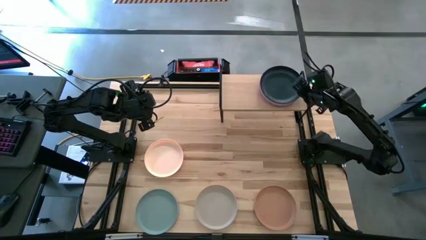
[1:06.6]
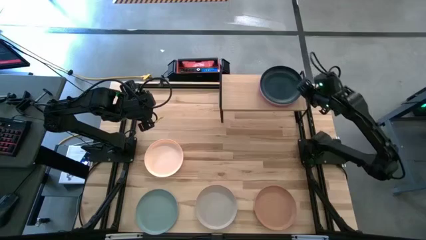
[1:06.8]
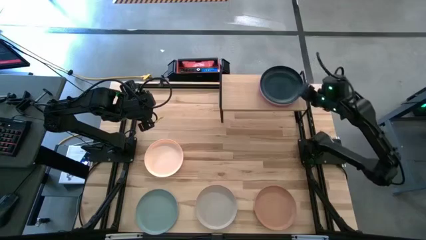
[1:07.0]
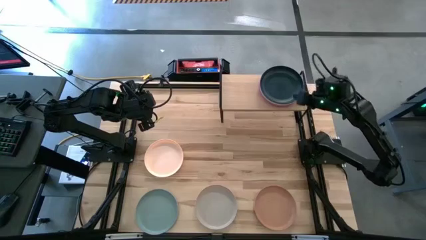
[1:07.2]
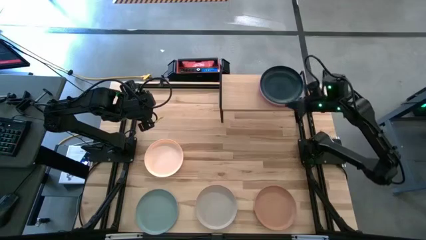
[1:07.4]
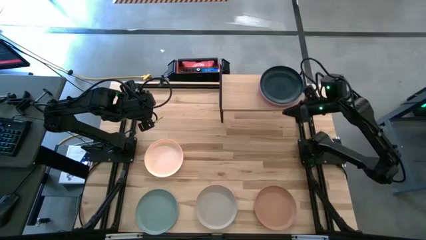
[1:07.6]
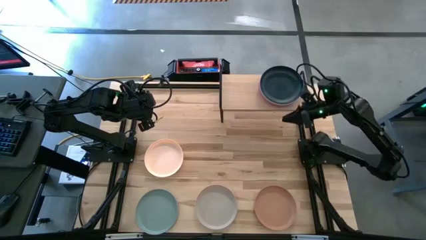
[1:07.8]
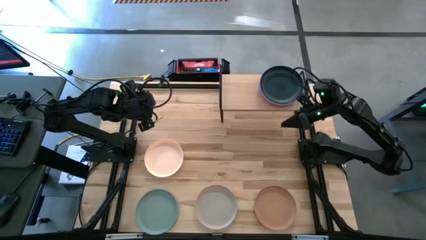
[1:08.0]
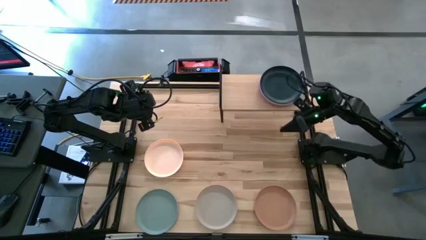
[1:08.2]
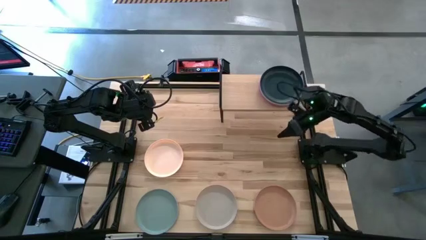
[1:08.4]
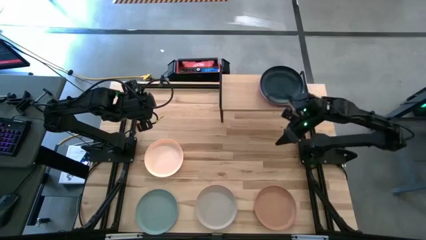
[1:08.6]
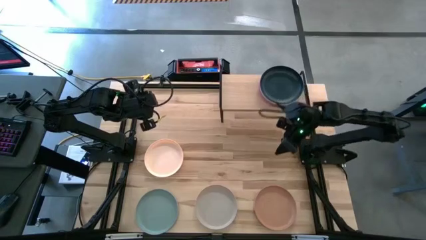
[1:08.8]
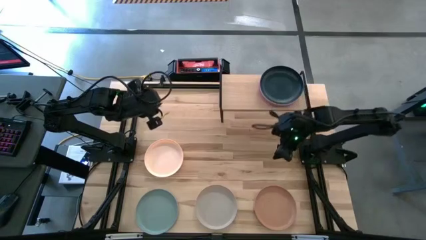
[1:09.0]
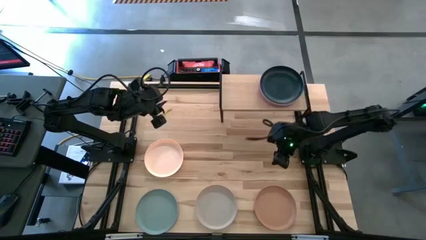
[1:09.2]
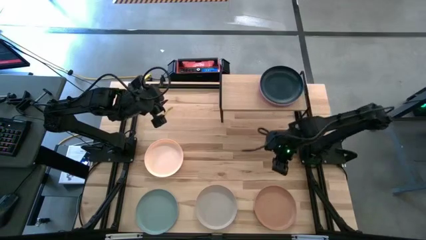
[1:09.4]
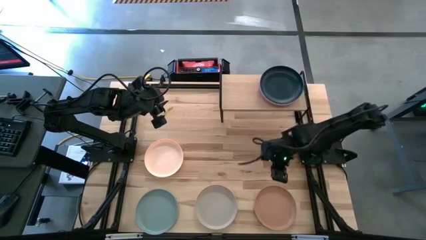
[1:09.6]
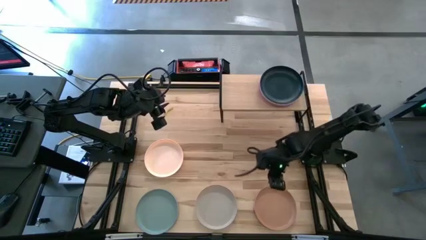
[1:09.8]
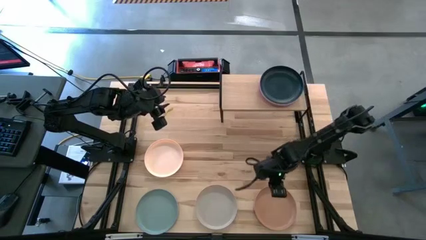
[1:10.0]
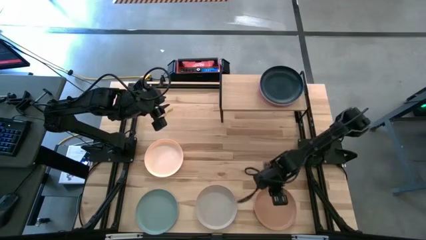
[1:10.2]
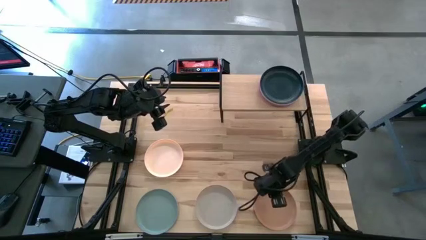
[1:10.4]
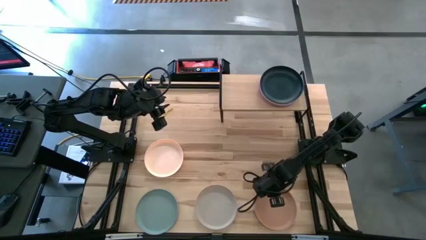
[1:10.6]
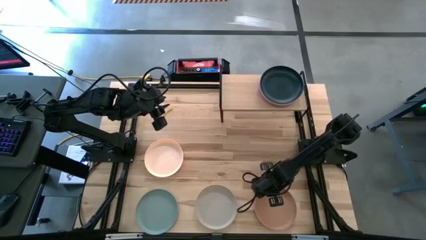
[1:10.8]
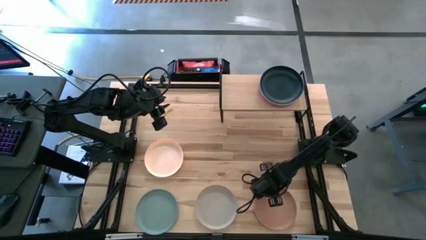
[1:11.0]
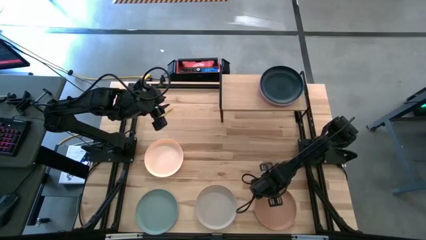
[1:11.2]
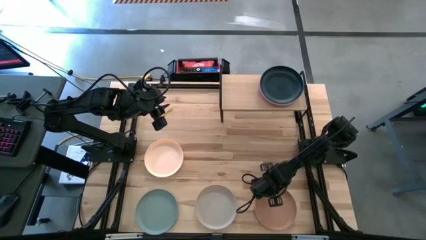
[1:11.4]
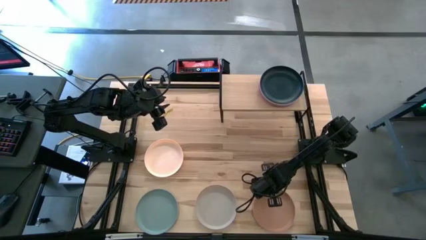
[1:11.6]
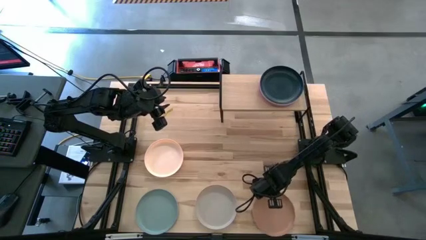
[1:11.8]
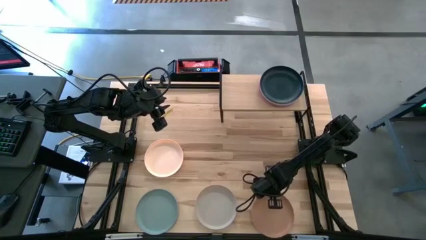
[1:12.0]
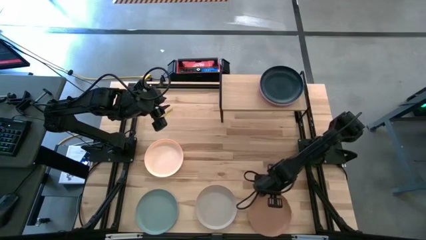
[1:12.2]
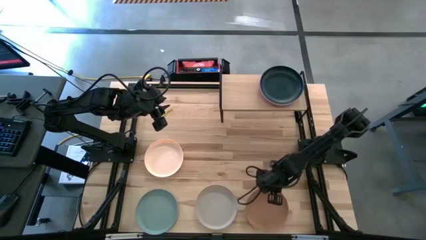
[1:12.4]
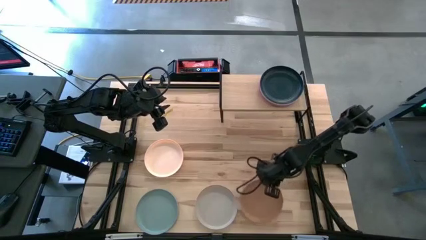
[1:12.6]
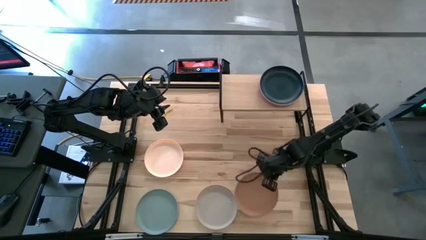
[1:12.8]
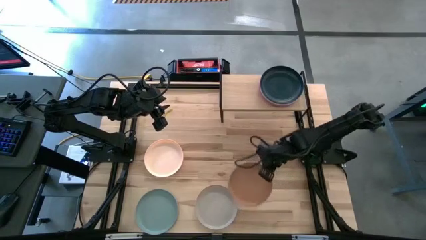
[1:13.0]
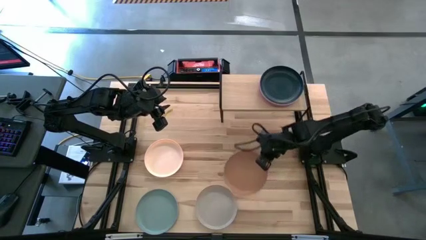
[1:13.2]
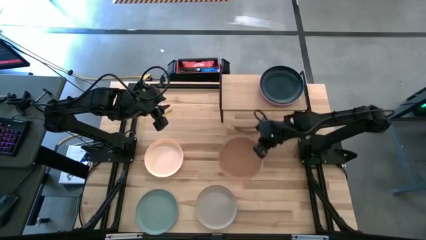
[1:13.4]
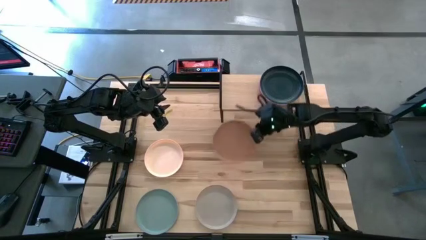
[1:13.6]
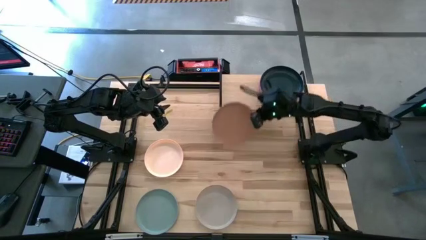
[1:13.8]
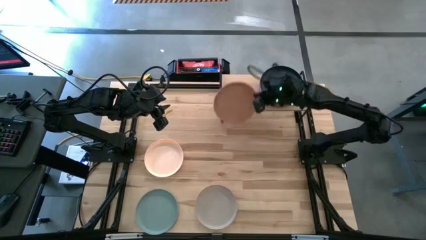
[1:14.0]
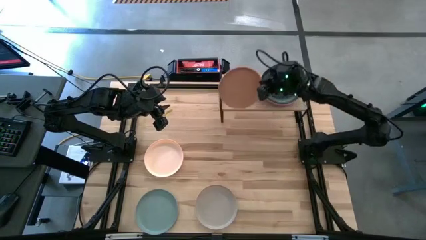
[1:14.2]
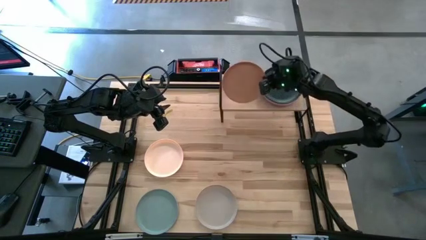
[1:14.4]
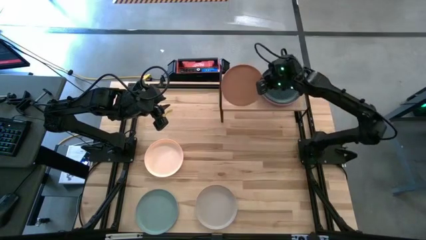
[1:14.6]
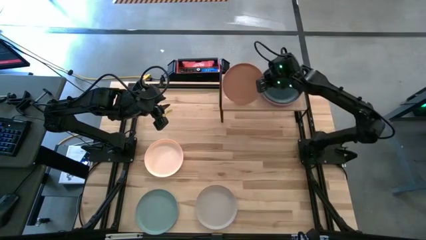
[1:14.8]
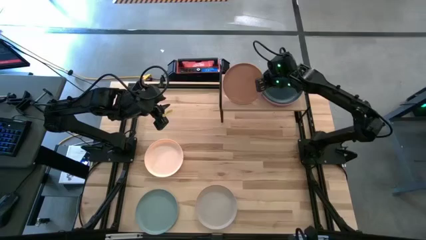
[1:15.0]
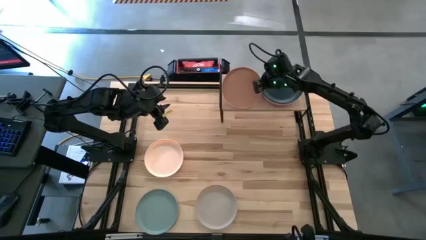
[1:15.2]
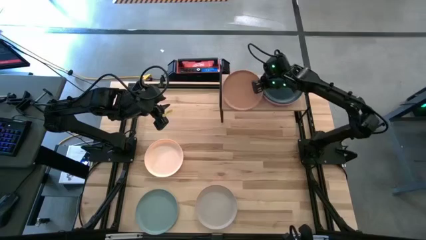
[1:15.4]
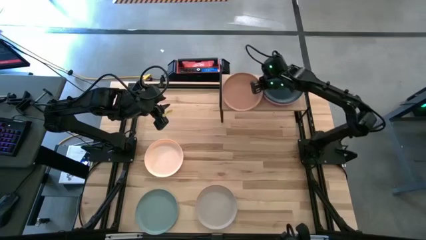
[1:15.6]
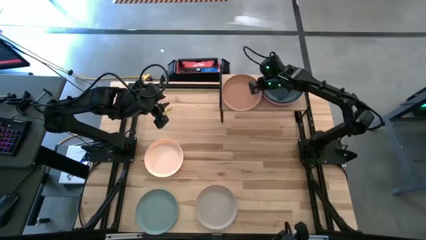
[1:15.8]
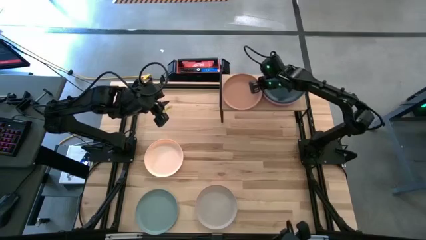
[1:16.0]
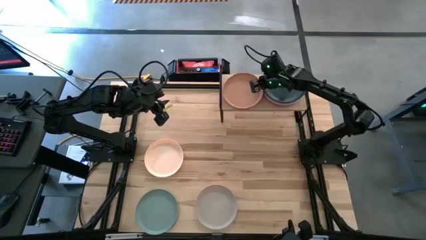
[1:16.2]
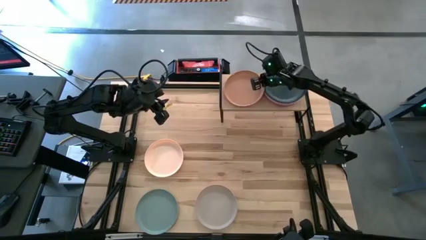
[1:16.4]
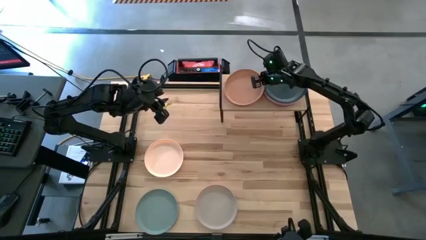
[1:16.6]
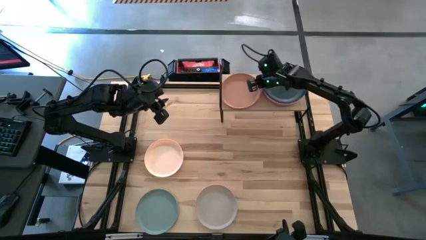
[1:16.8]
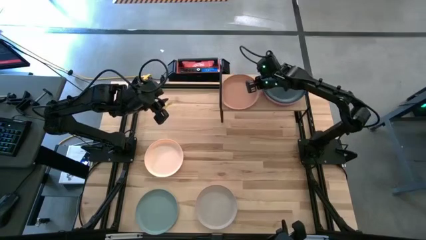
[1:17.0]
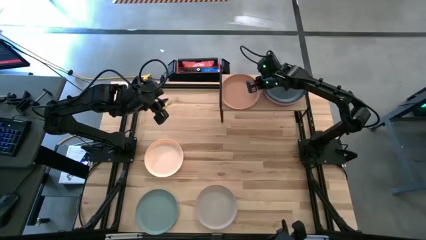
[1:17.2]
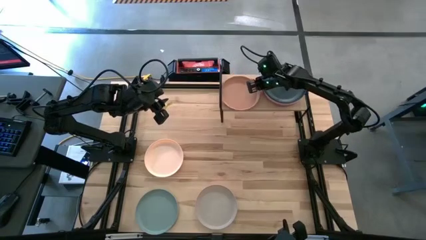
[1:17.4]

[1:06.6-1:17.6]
Task: Place and stack plates onto a shelf
Put the brown plate onto the shelf

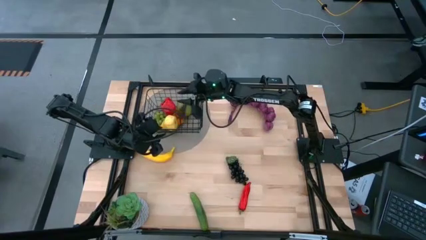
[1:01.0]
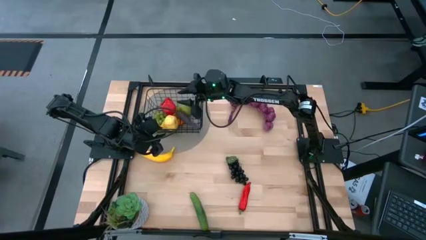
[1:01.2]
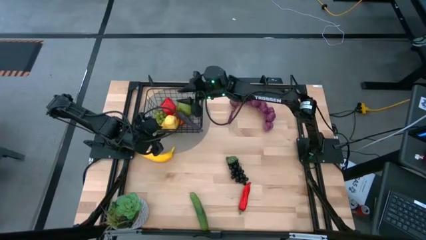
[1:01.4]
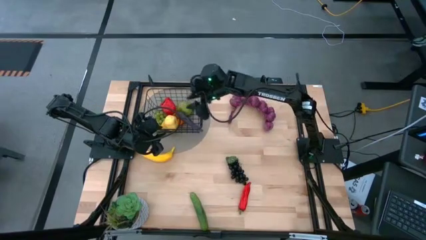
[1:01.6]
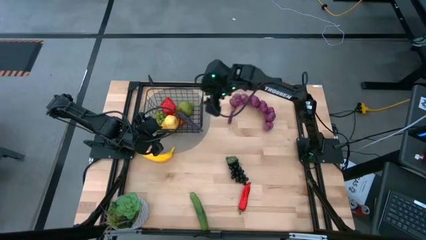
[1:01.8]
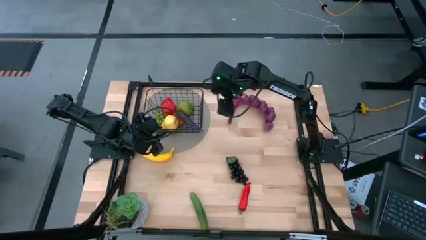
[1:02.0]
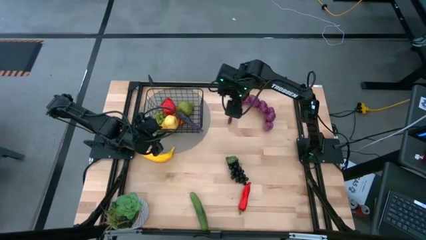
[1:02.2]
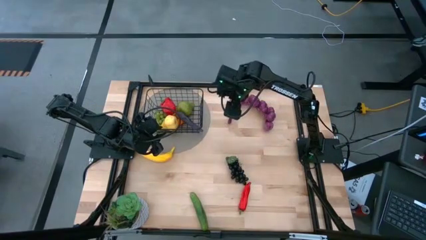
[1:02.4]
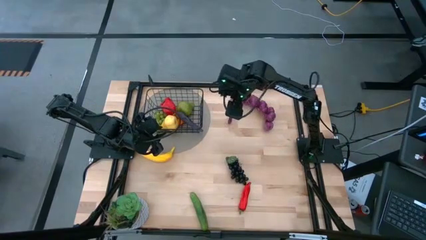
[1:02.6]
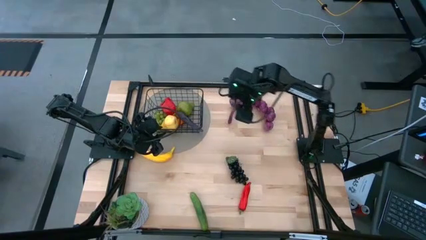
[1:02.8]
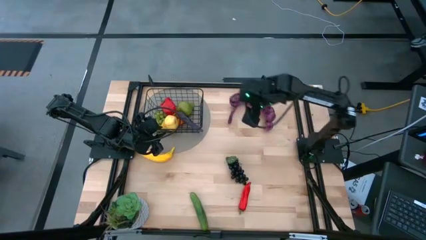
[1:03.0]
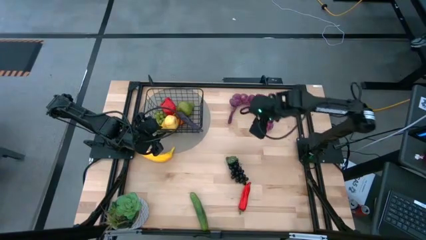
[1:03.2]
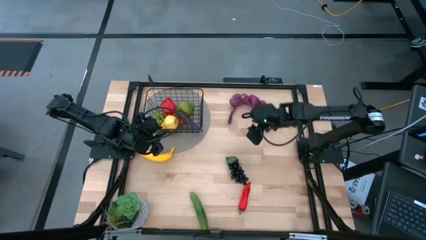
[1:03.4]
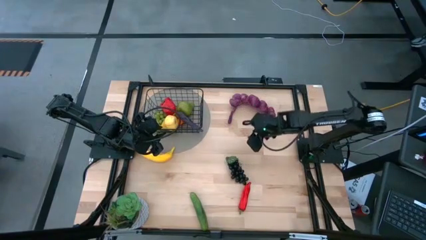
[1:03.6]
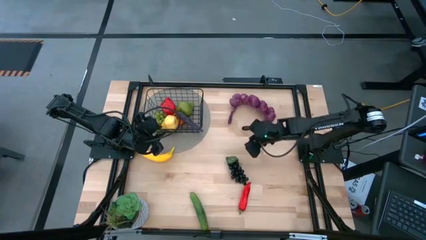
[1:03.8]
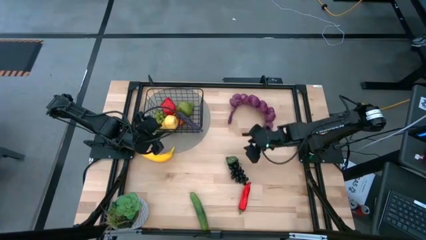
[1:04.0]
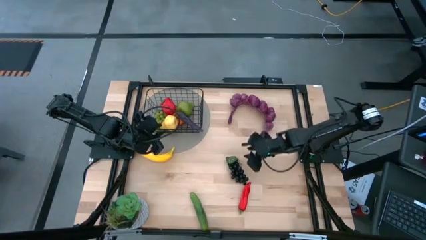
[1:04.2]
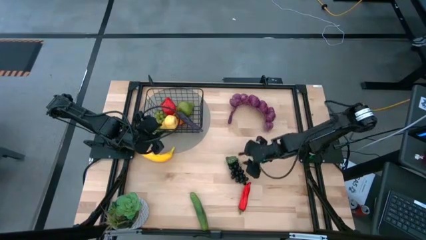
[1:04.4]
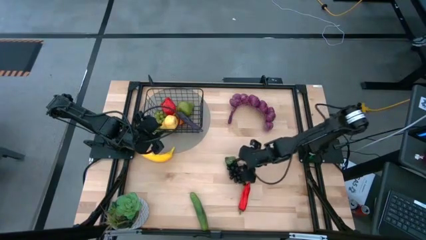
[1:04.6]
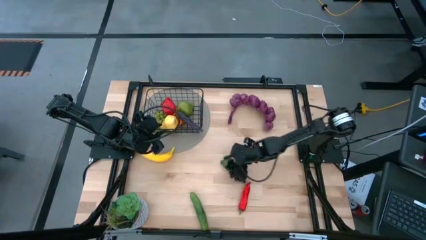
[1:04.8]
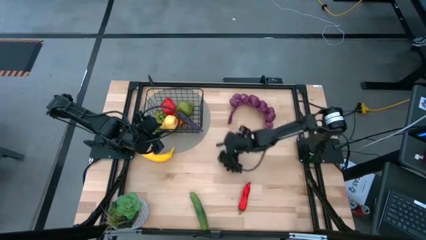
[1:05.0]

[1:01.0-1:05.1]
Task: Build produce basket
Adjust the black grapes on the table

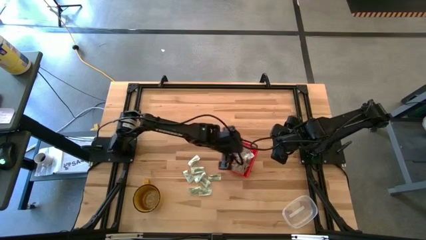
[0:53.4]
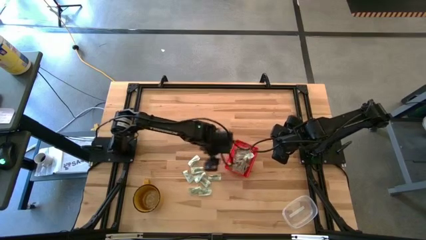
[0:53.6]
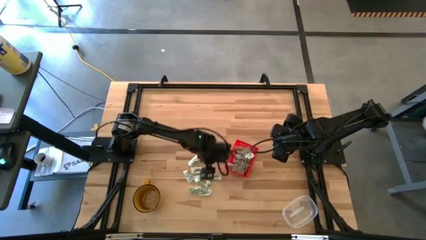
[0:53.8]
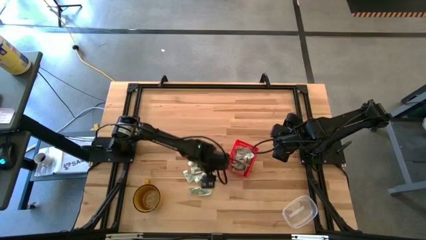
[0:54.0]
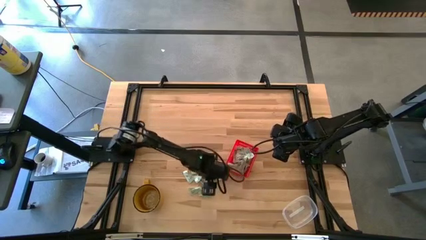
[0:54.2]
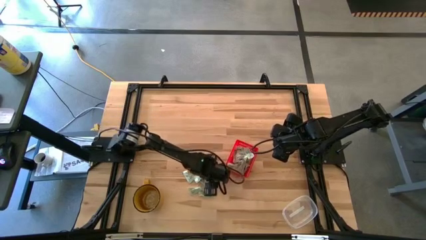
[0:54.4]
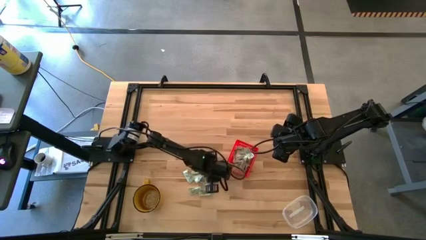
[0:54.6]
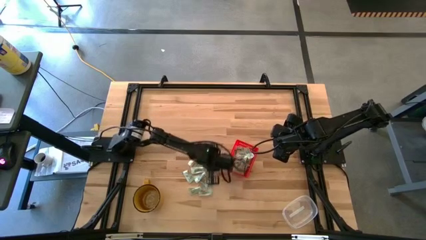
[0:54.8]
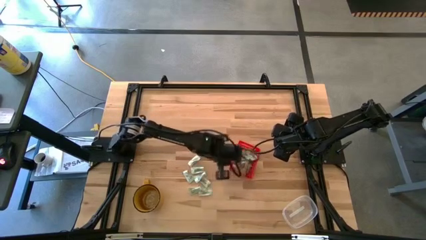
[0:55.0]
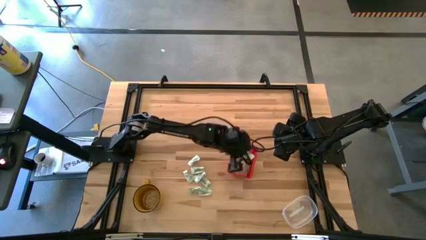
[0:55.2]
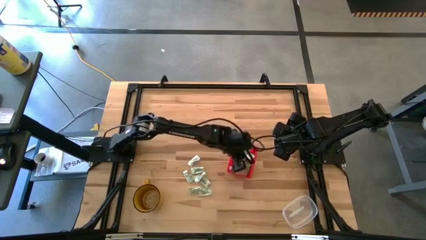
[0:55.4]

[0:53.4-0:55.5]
Task: Pick and place items into bin
Put the light green stevia packet into the red bin

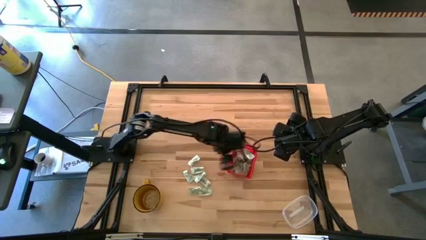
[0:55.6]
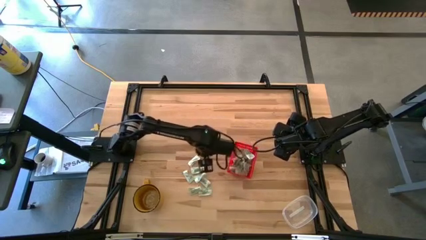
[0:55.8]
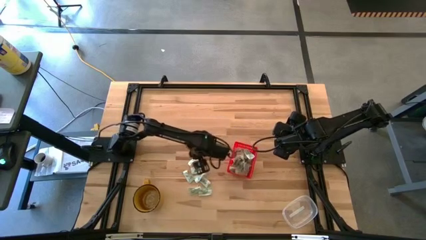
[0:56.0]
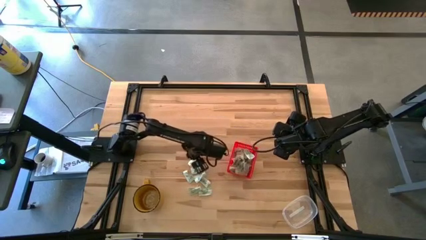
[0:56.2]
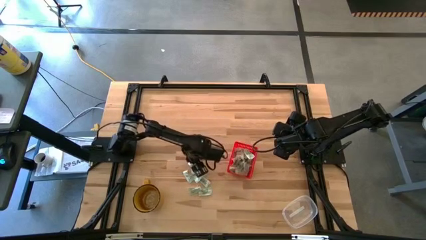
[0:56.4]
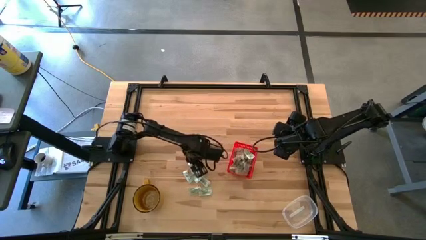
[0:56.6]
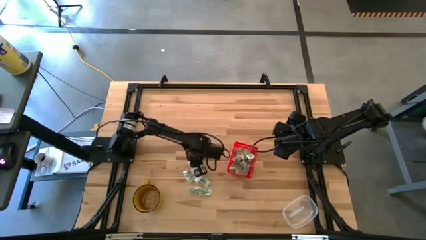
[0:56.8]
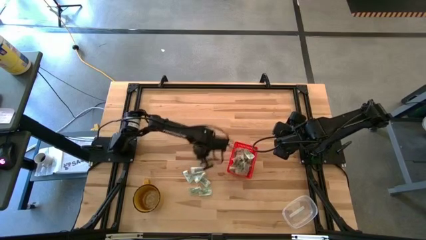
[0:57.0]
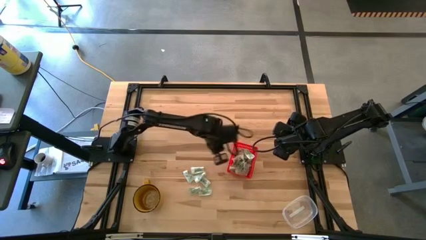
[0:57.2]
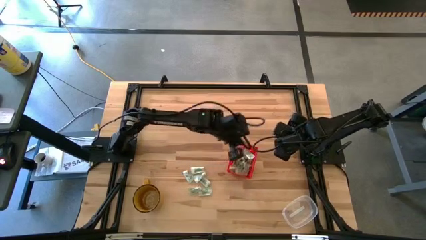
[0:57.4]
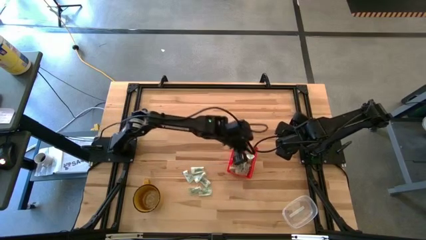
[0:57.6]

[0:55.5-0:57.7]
Put the light green stevia packet into the red bin
